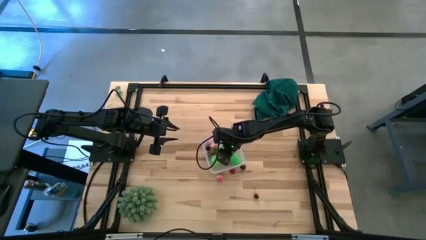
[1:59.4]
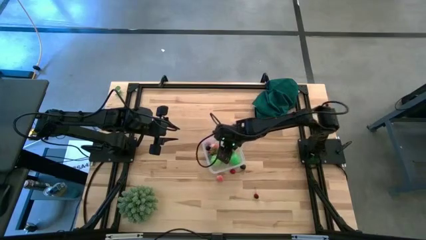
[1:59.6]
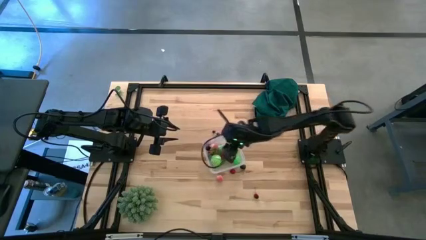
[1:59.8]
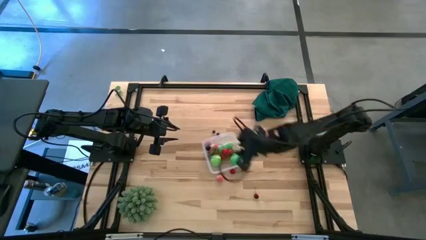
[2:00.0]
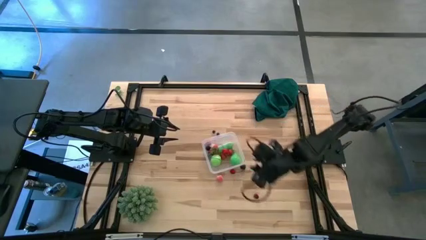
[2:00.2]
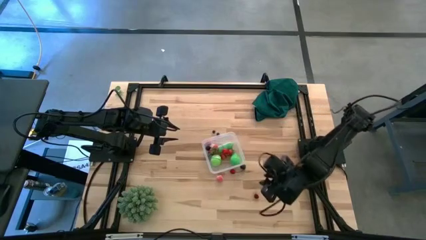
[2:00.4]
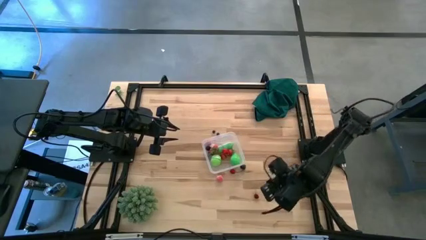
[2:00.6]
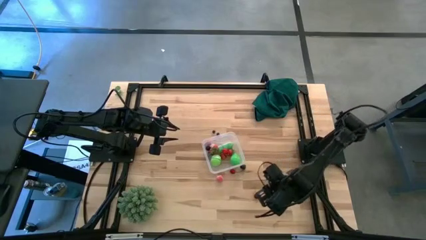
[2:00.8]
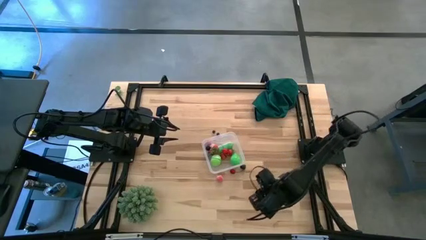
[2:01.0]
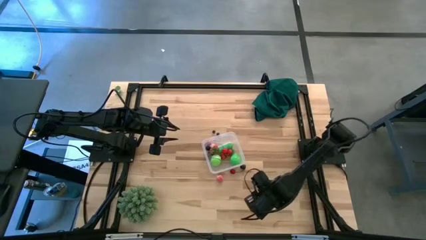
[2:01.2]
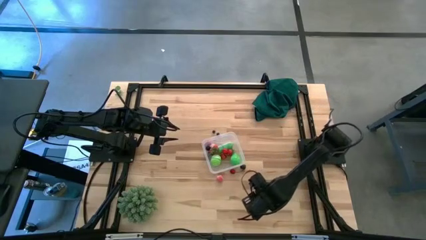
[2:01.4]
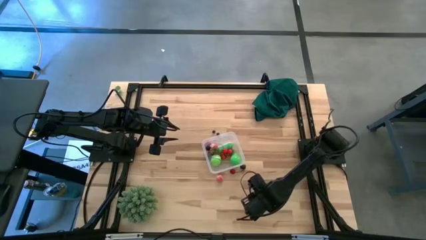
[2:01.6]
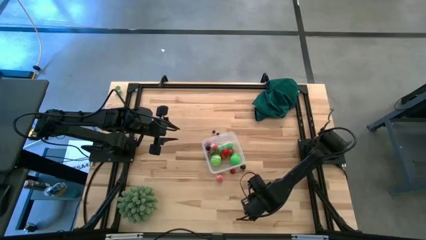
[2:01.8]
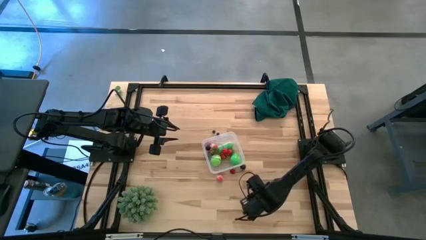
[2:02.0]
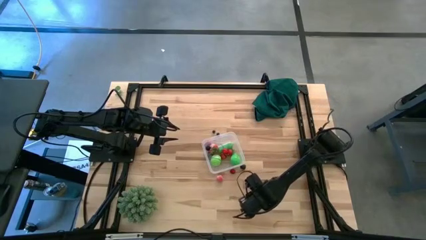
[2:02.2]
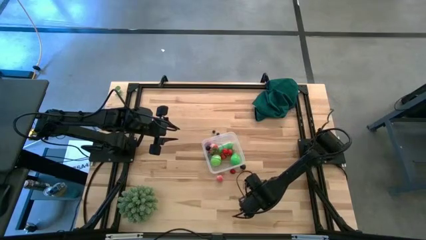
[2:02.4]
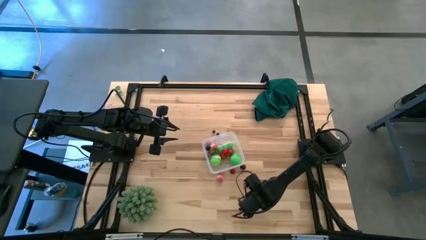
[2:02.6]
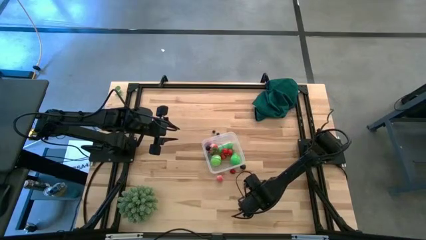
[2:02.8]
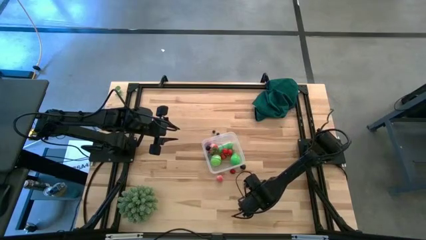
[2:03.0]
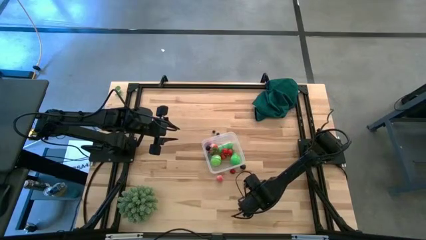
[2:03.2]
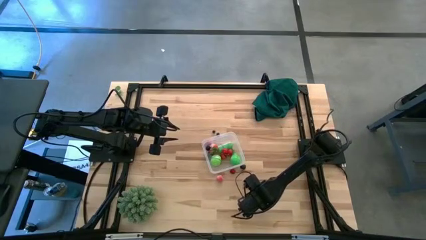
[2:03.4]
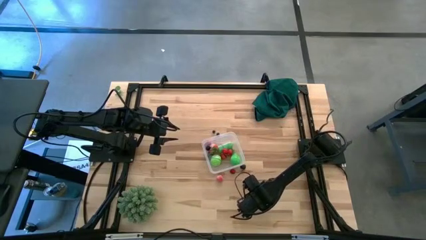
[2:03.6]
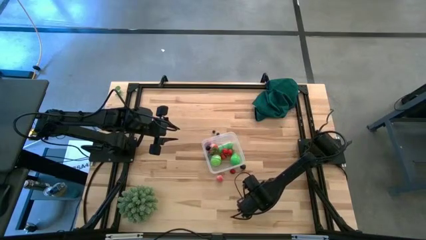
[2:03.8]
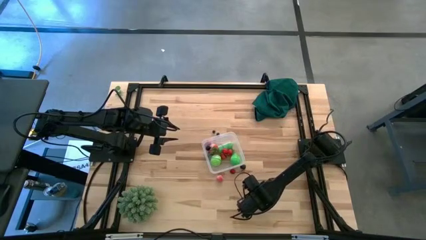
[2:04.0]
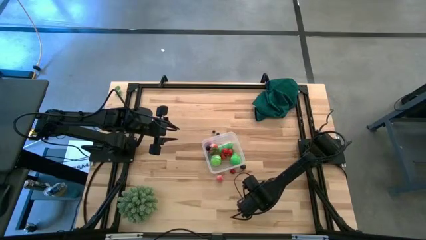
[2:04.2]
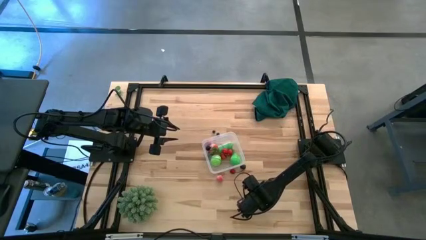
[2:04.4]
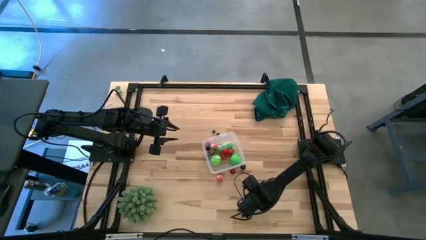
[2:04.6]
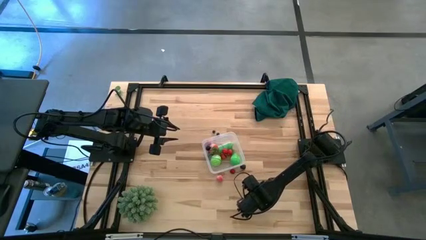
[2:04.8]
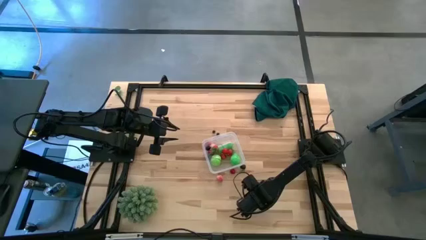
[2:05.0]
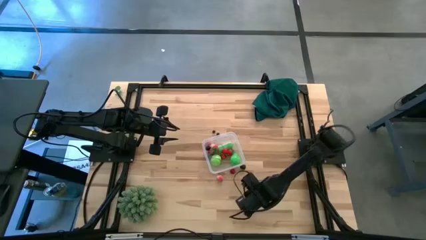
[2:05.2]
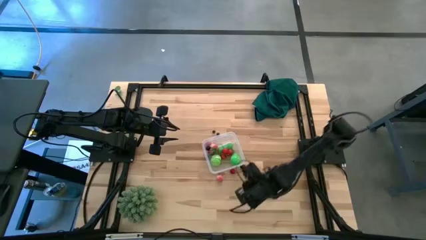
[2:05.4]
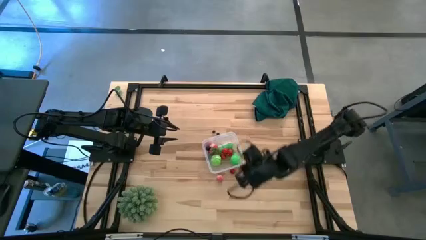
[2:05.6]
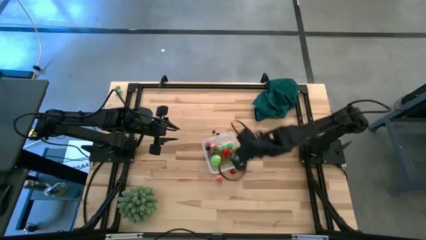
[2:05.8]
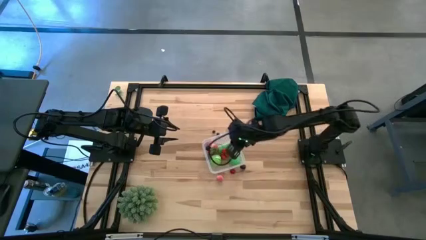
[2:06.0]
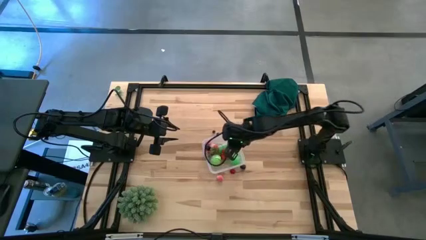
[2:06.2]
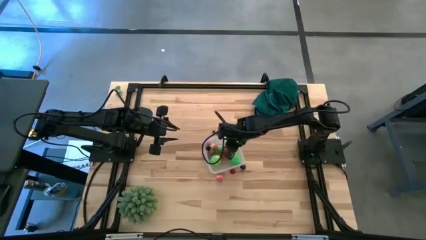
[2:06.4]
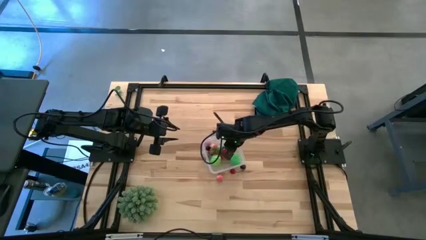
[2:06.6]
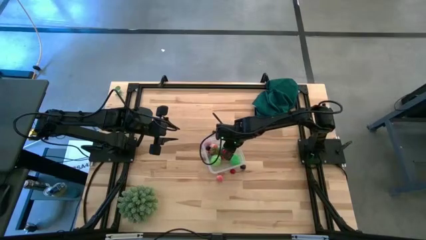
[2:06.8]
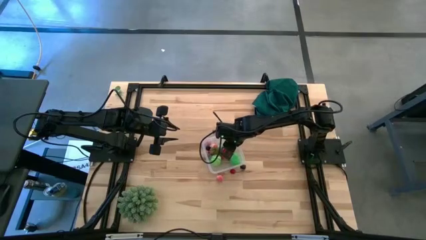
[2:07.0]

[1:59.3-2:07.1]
Task: Pick and placing Produce into tupperware
Put the red cherry into the transparent container

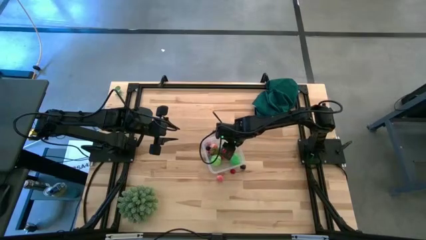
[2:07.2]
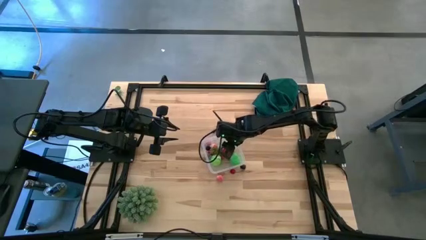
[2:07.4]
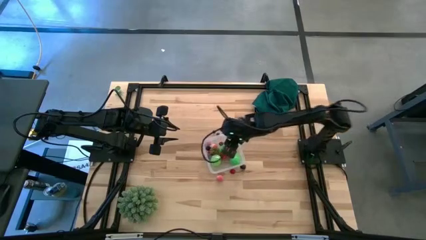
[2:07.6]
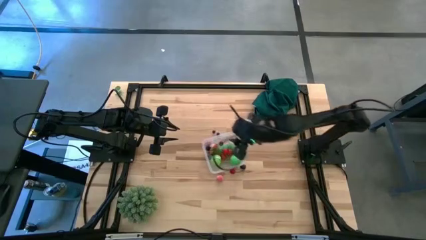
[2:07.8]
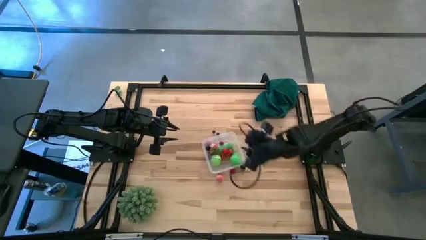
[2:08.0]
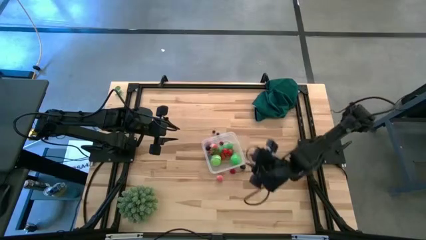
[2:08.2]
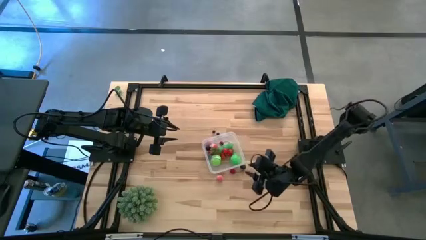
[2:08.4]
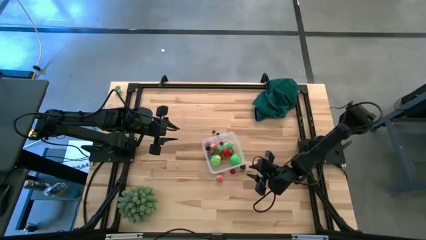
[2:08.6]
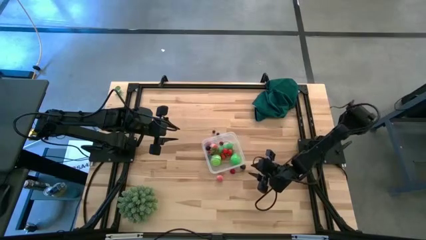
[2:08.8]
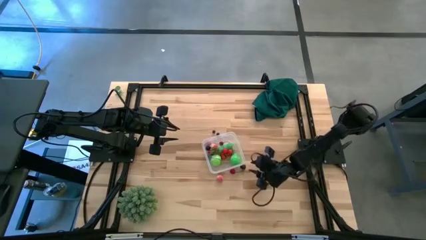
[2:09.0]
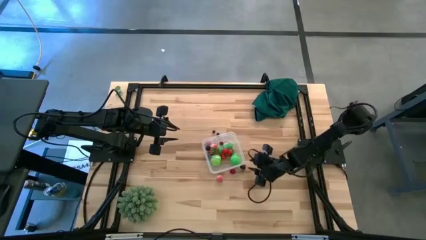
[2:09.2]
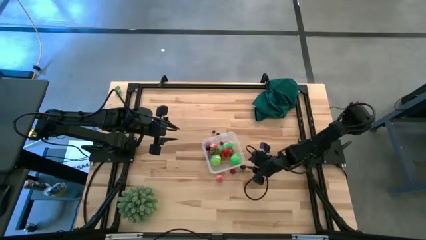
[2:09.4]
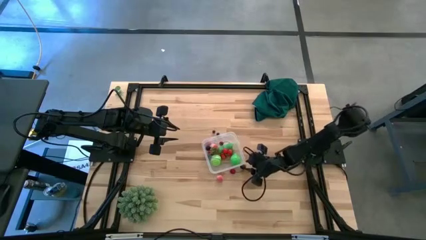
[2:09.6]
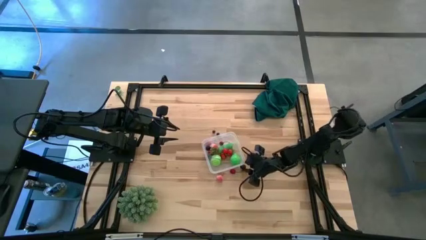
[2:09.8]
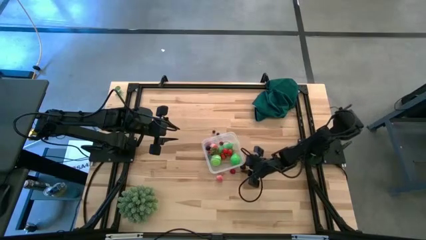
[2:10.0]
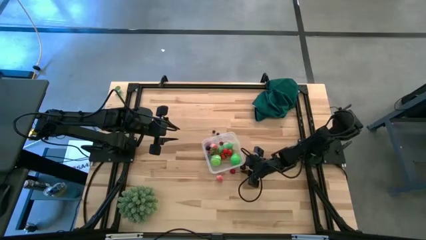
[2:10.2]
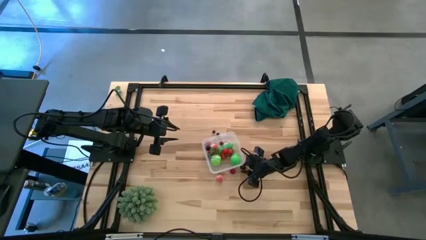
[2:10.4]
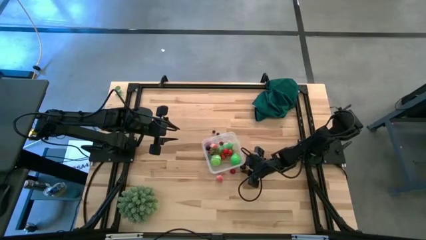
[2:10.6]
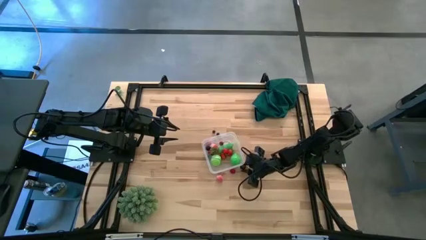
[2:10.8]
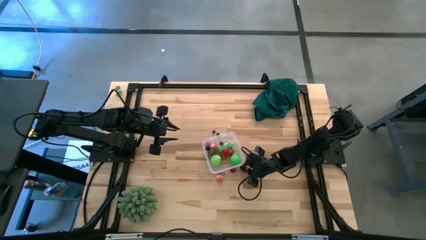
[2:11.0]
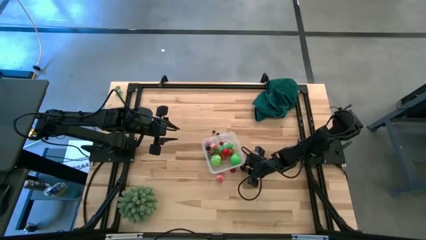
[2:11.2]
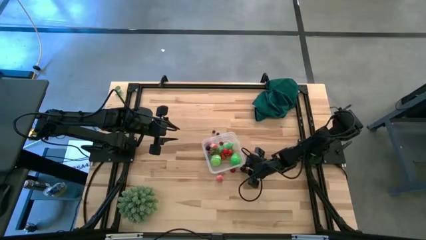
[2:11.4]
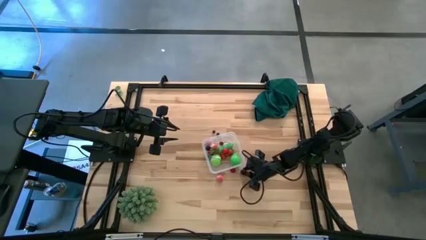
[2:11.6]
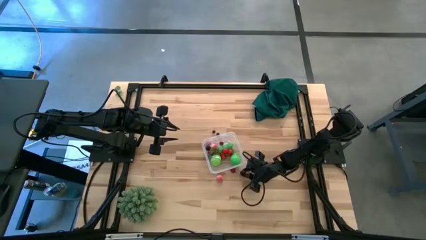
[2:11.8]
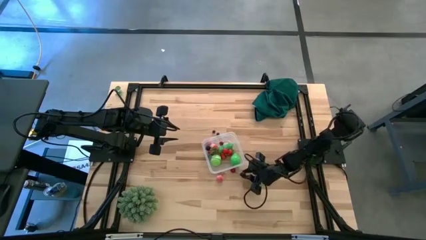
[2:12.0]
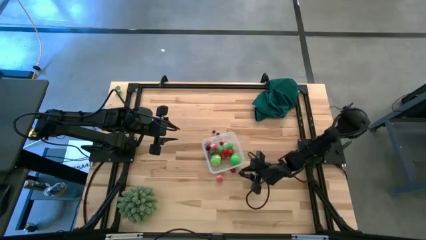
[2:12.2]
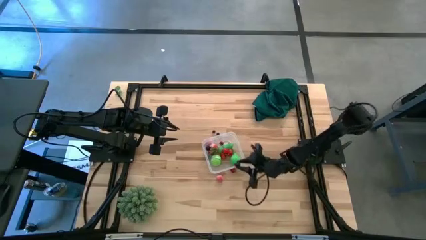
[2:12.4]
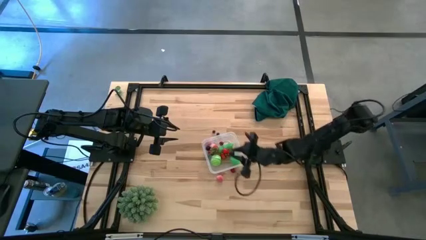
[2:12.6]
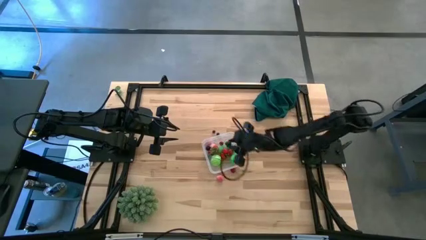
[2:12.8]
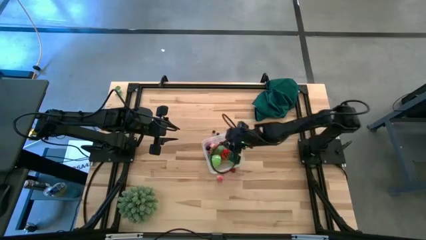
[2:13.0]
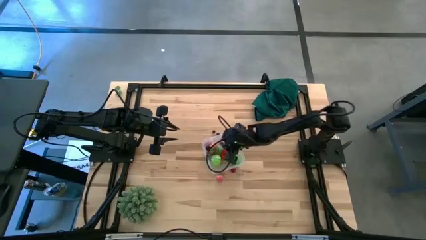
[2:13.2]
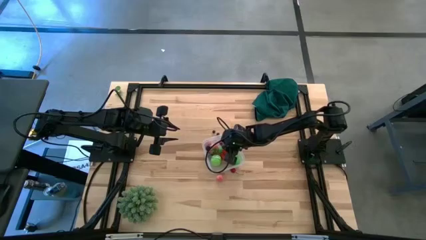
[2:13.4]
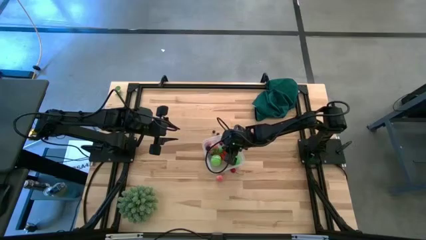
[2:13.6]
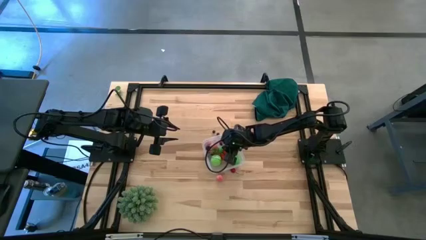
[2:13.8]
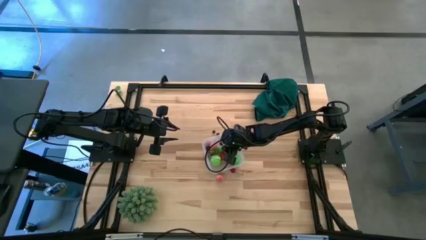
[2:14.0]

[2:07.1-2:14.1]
Put the blackberry into the transparent container

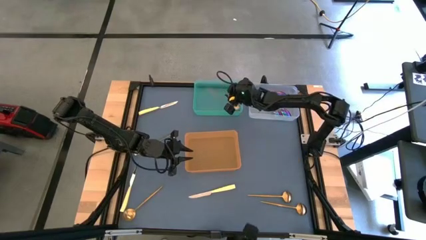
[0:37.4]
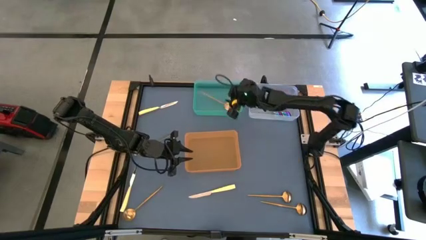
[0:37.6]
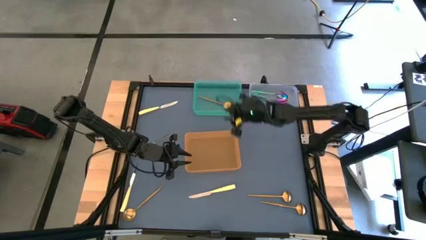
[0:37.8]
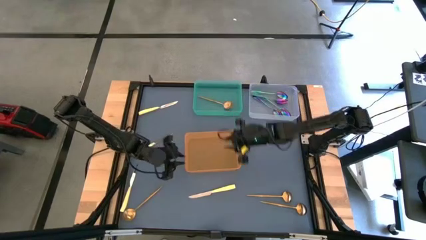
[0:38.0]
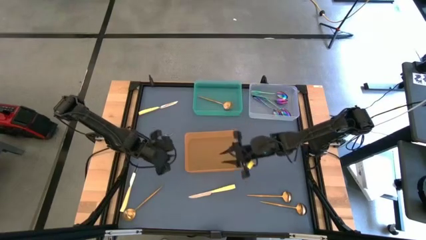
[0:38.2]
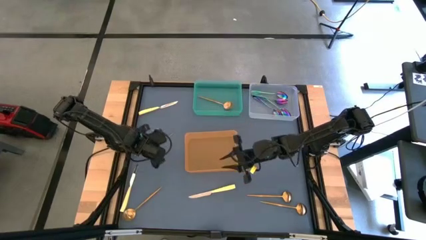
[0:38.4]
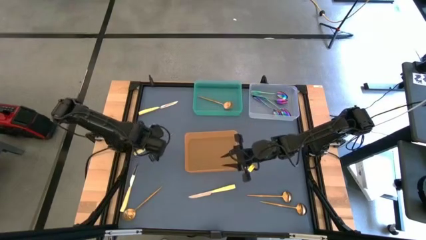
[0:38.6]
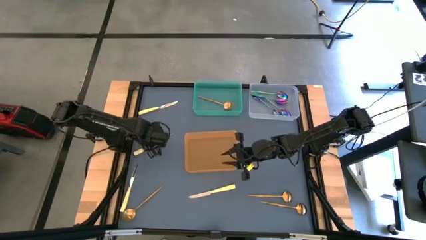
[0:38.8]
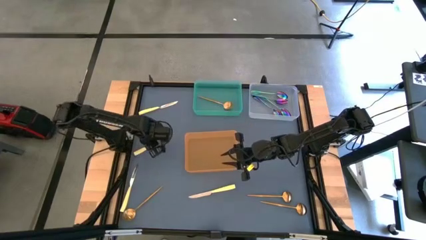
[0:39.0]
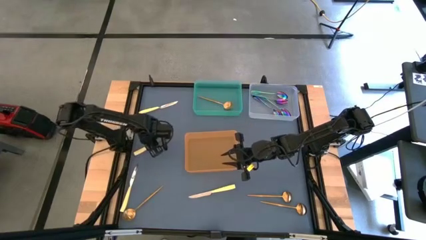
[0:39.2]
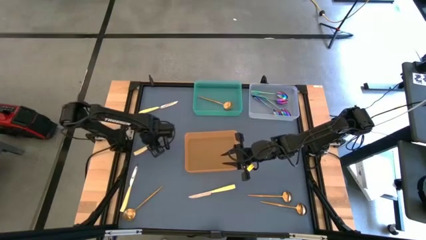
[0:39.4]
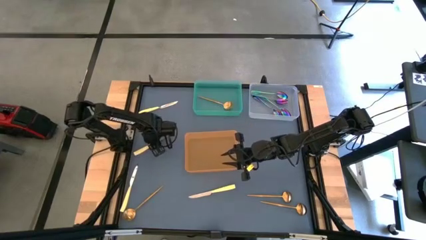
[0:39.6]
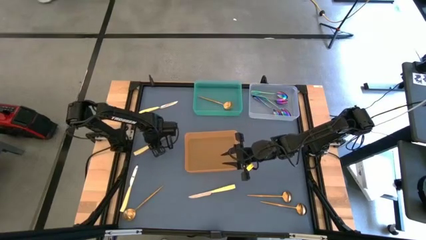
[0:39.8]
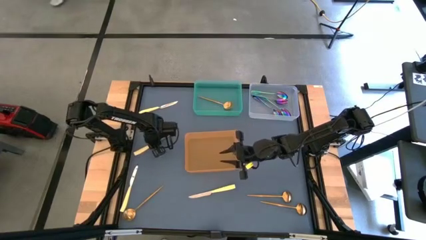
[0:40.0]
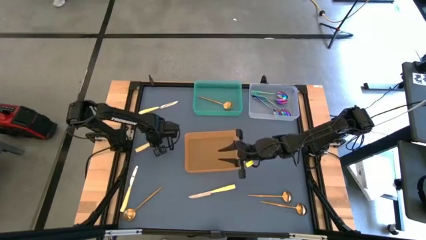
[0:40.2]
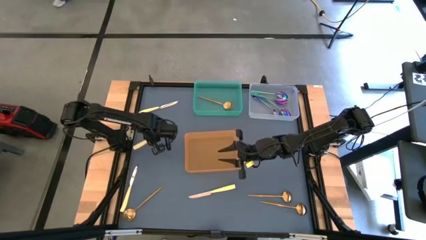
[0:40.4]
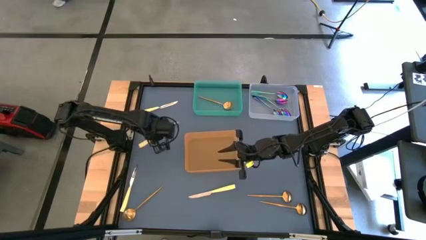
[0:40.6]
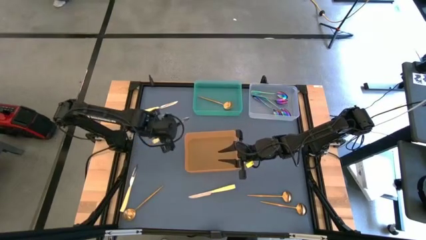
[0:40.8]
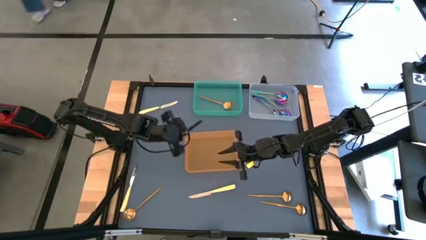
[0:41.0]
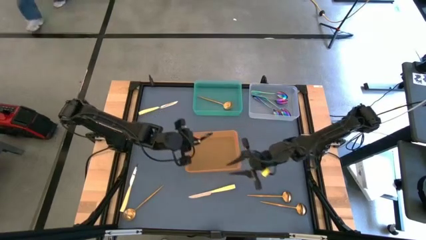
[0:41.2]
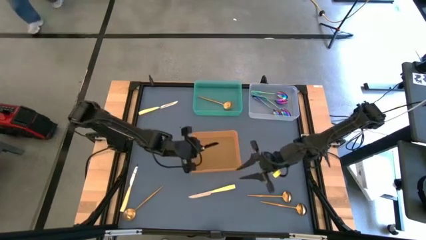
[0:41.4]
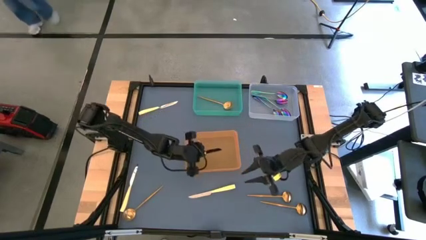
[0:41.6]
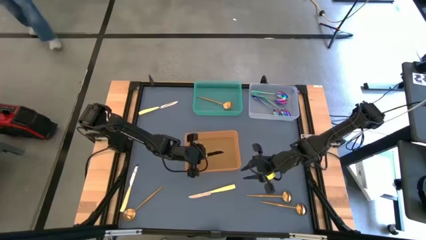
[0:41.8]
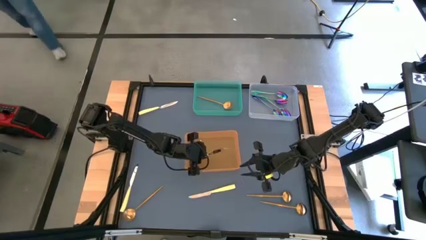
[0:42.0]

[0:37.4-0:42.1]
Task: Sort silverware by color (type)
Put the yellow knife into the orange bin
